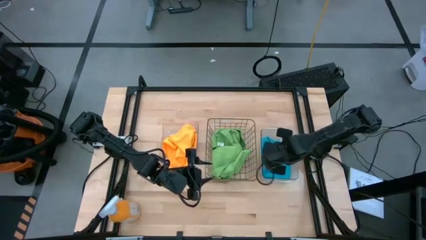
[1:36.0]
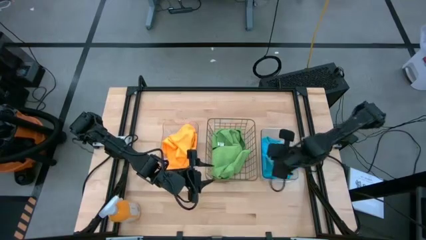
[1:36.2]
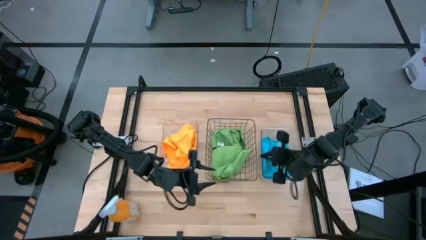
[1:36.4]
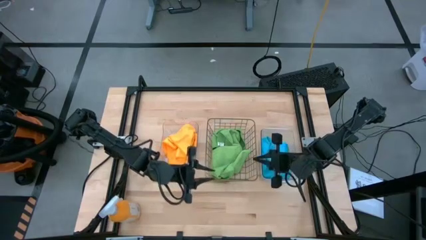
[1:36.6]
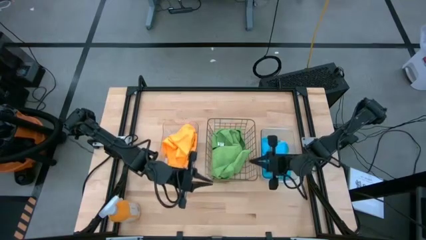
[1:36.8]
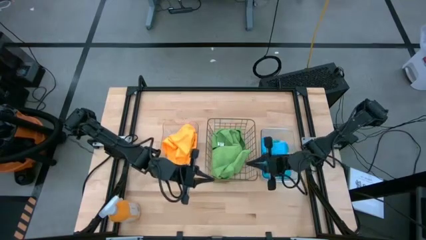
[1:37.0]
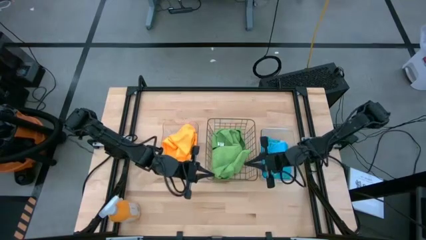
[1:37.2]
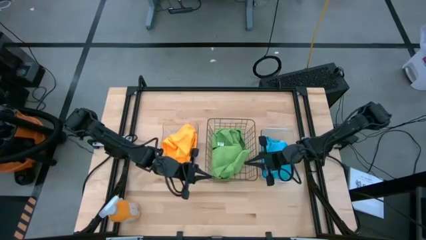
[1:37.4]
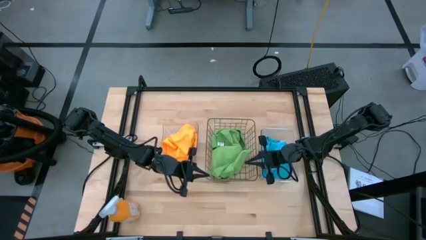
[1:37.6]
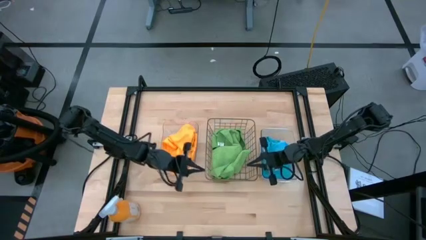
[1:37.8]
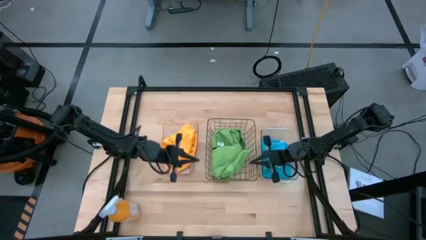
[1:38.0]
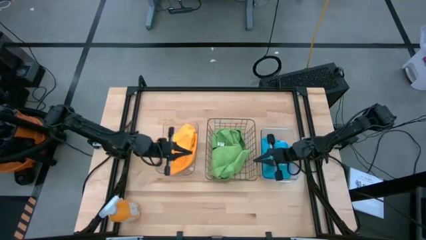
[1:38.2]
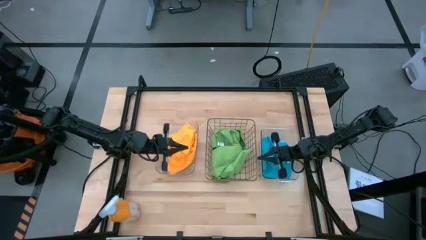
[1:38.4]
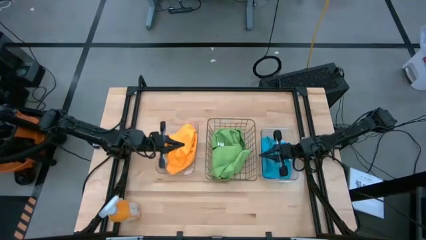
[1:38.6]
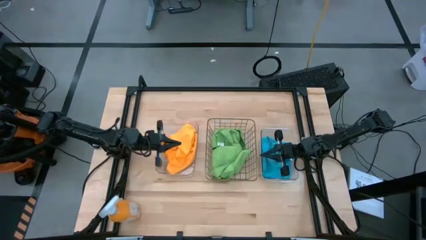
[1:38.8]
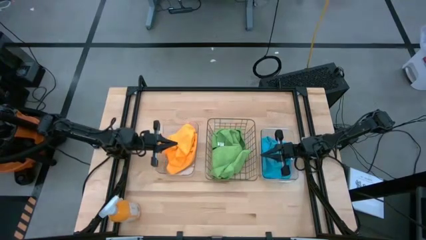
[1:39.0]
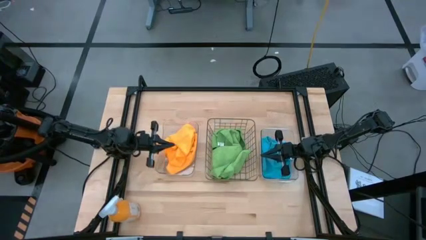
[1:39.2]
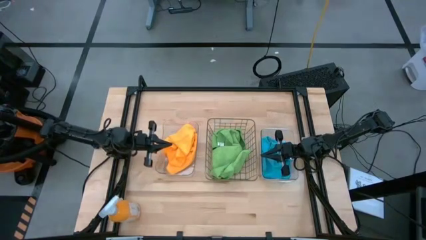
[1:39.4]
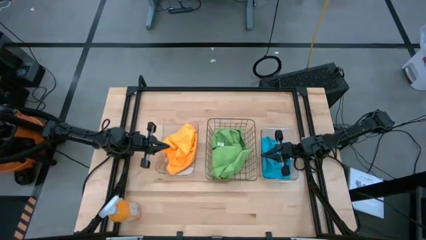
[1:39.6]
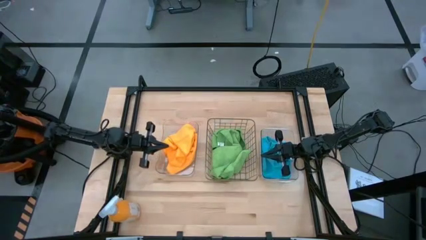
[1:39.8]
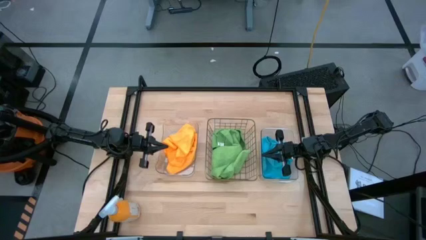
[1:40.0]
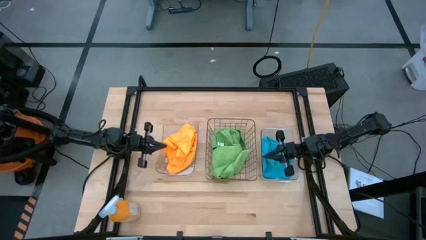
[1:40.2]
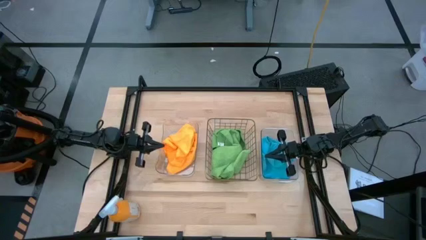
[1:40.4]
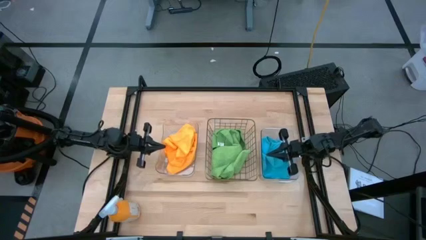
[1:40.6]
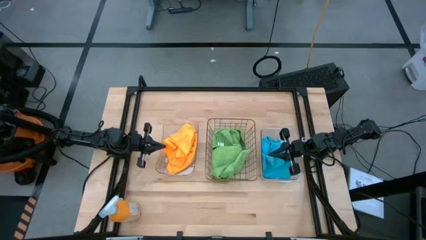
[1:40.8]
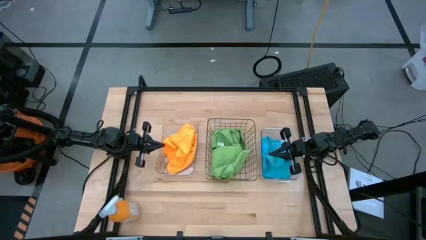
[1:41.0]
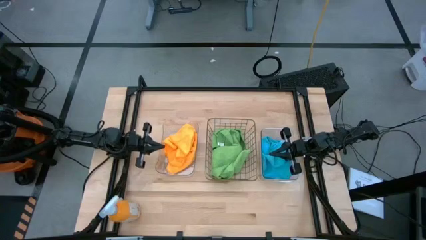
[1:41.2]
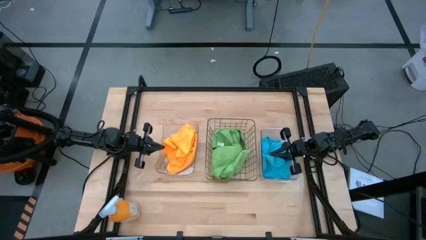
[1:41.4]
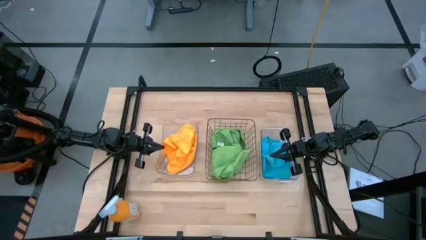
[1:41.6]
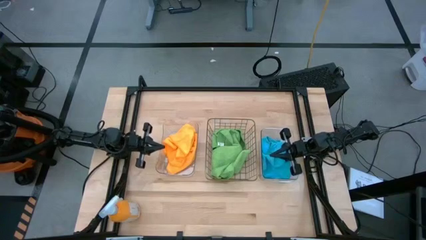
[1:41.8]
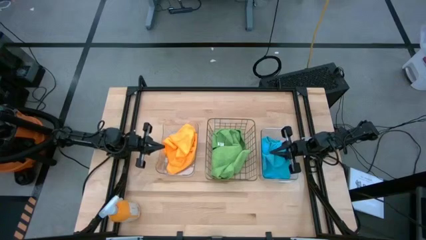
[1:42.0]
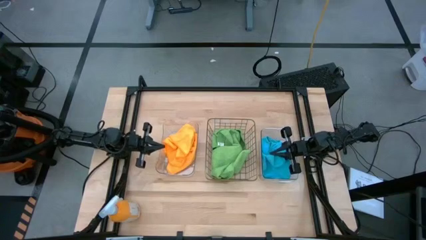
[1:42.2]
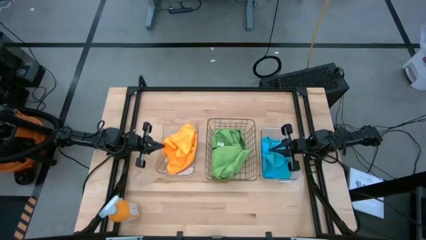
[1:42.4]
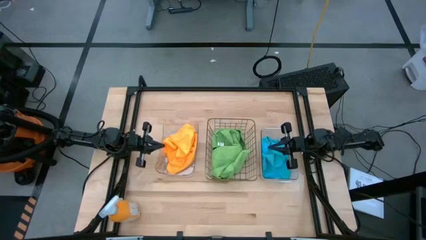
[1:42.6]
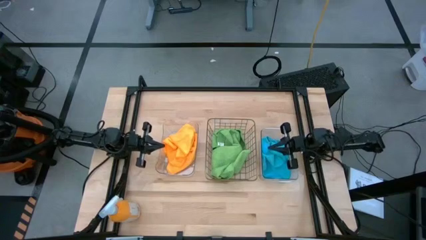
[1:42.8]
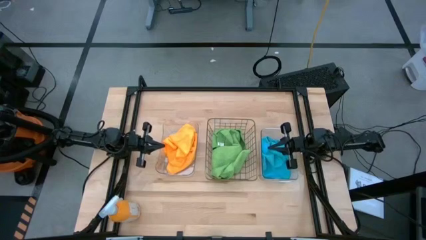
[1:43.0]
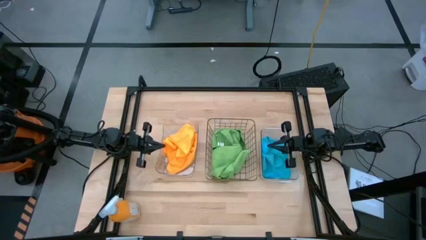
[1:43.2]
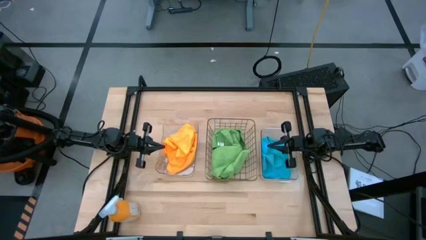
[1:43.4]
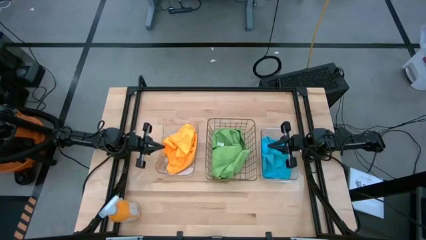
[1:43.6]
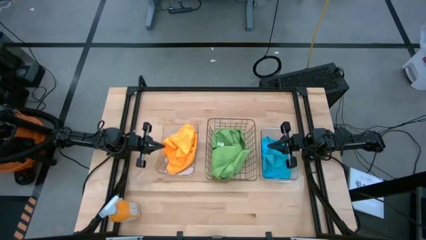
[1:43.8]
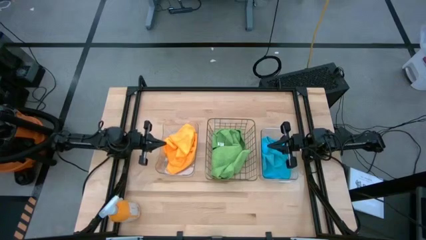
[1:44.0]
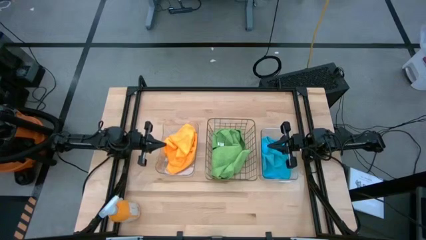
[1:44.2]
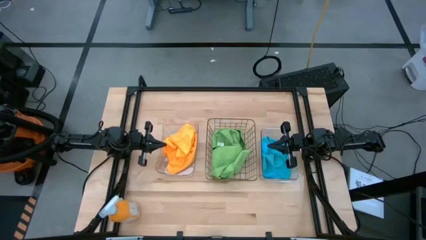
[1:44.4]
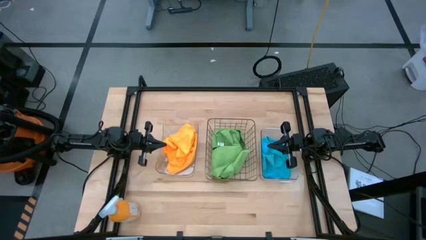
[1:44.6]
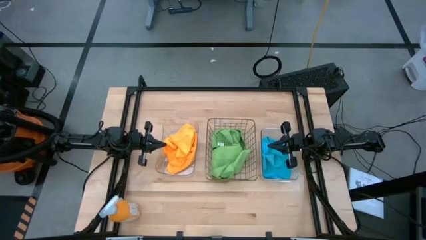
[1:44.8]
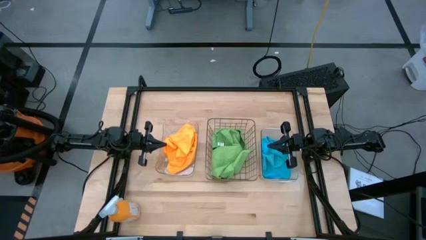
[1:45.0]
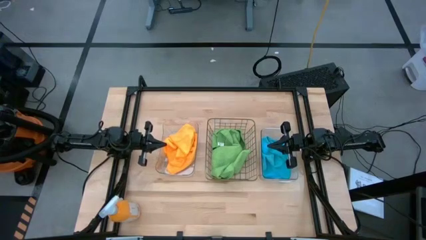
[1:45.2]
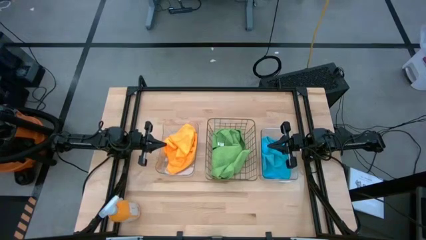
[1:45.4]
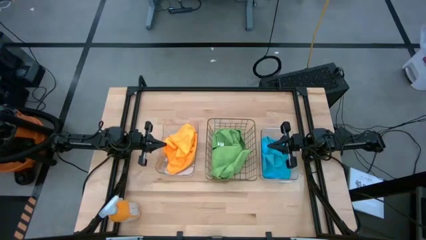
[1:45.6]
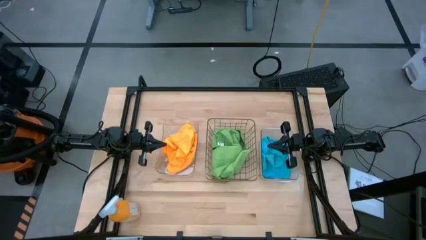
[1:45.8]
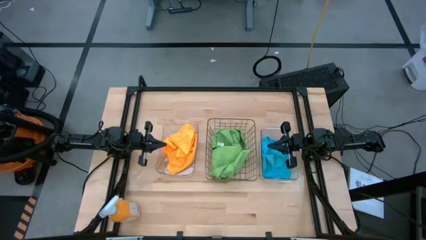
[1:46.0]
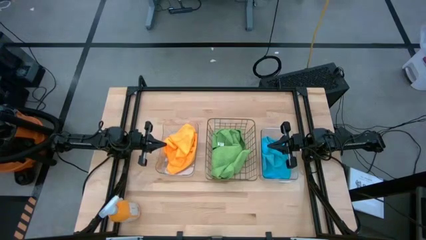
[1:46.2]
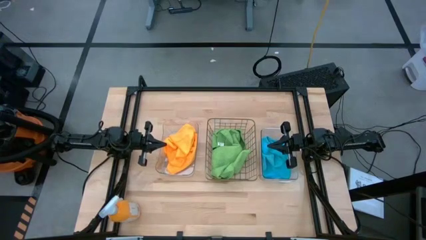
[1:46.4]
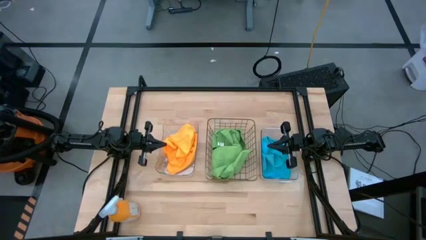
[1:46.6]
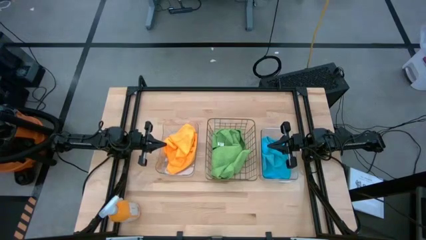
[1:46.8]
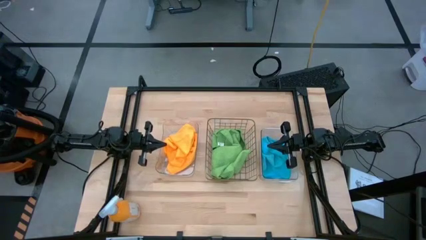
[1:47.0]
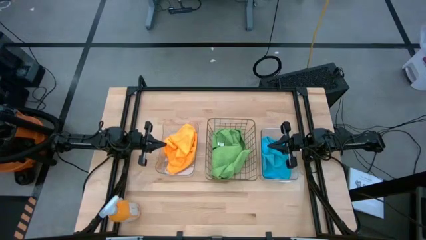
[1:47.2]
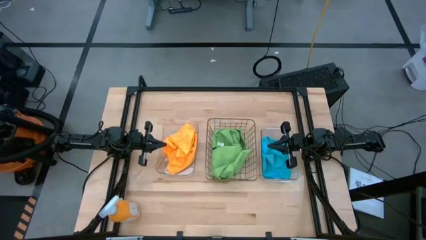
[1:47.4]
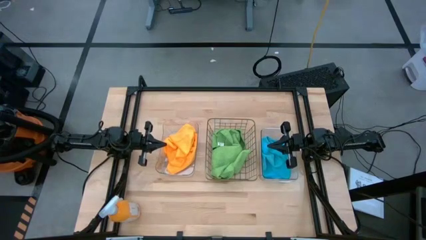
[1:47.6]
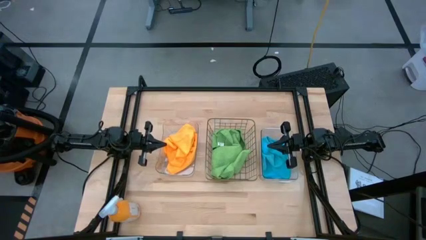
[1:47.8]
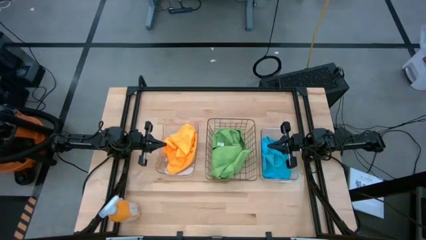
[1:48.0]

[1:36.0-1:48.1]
Task: Sort microfiber towel by color & place in baskets
Return to Home Position

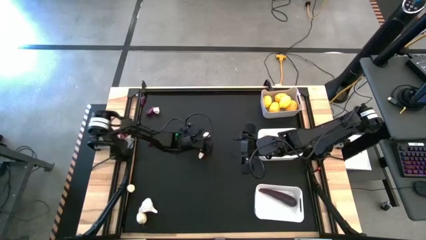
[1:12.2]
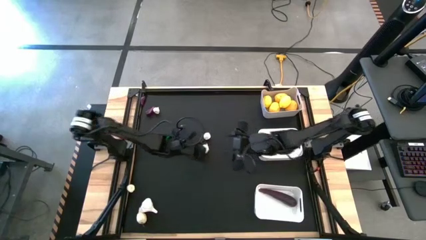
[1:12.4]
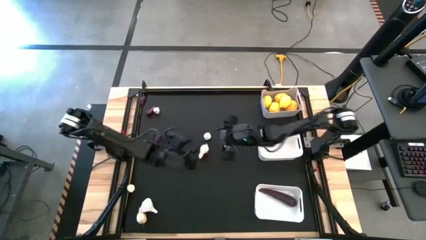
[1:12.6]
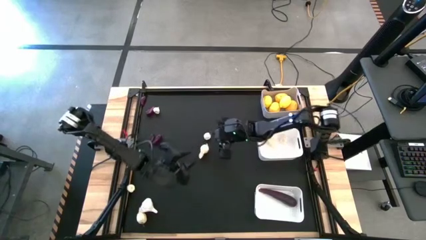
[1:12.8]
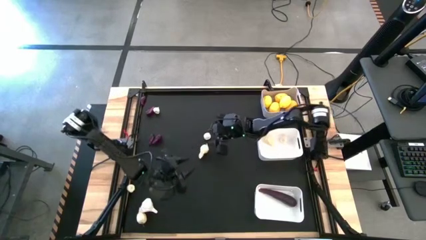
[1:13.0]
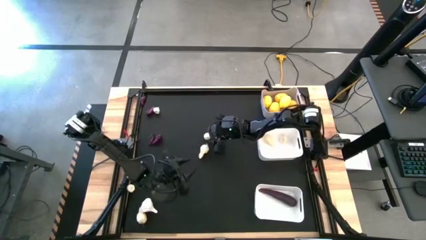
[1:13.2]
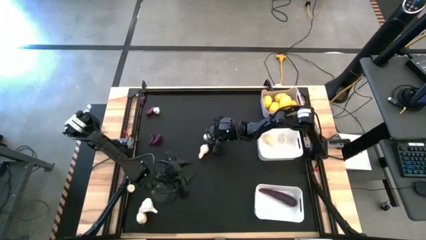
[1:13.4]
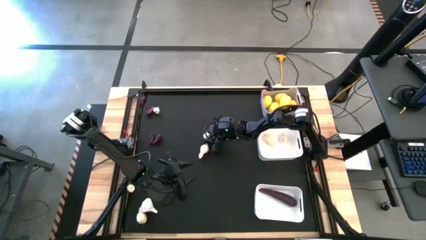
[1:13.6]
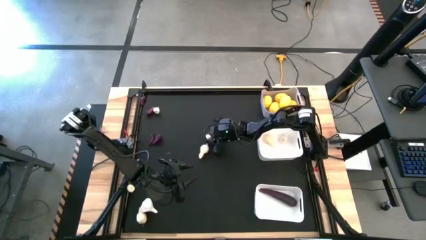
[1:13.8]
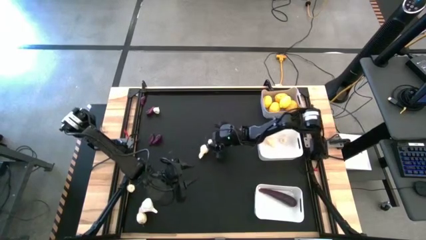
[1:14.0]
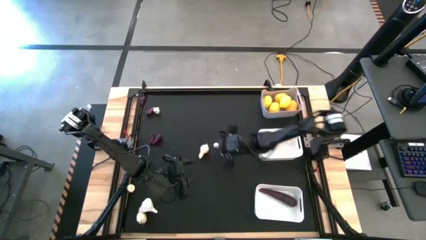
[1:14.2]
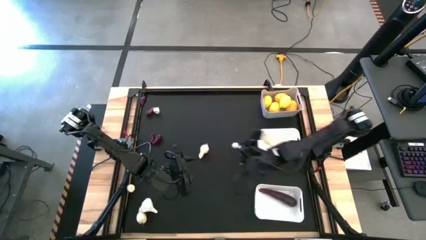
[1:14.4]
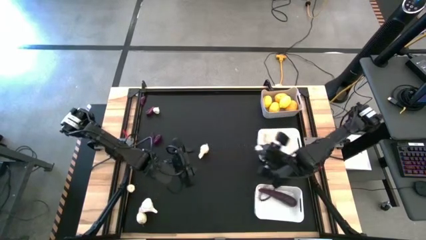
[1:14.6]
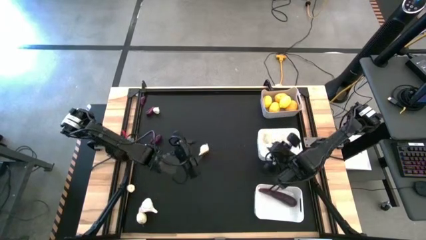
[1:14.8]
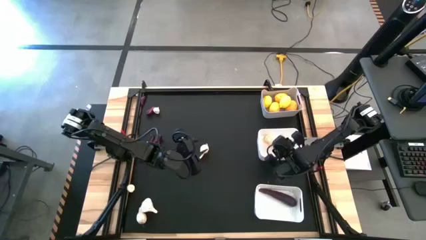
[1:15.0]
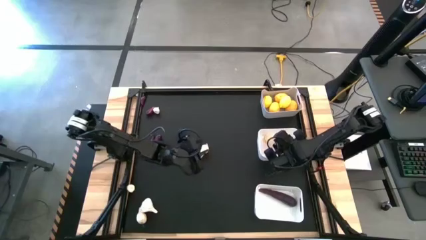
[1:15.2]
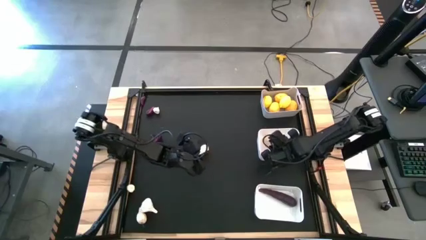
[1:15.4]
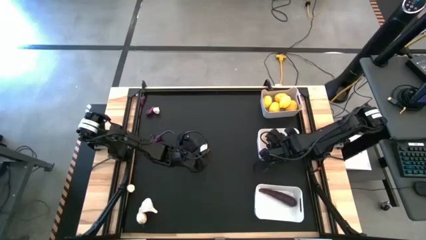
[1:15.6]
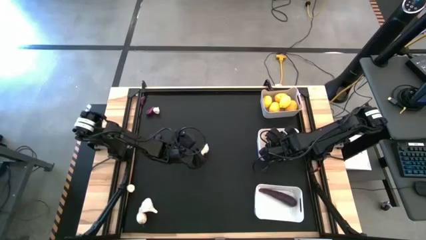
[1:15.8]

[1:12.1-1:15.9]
Task: Sort produce into baskets
Put the garlic into the top white bin
